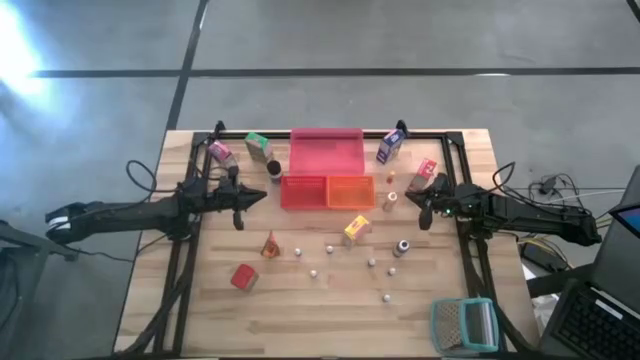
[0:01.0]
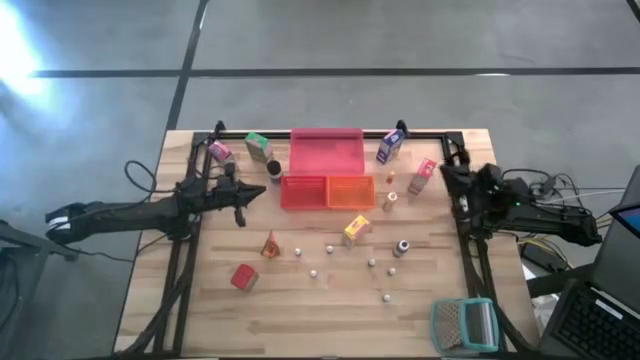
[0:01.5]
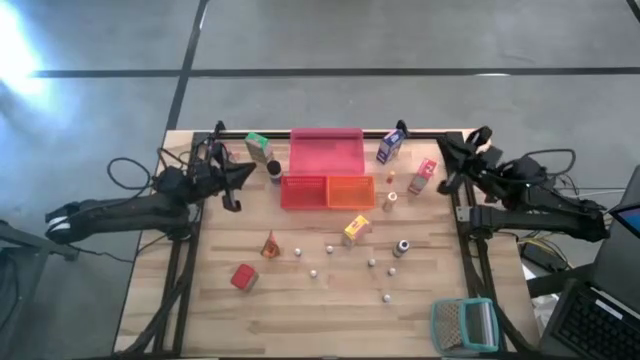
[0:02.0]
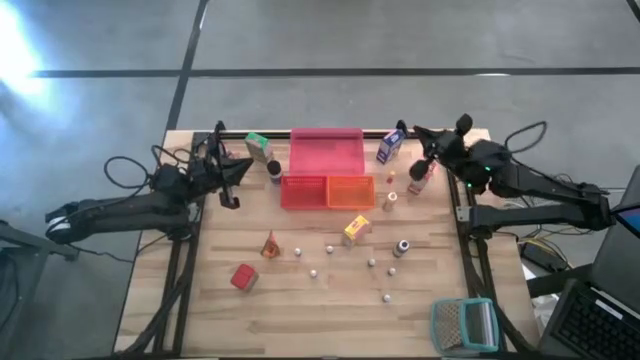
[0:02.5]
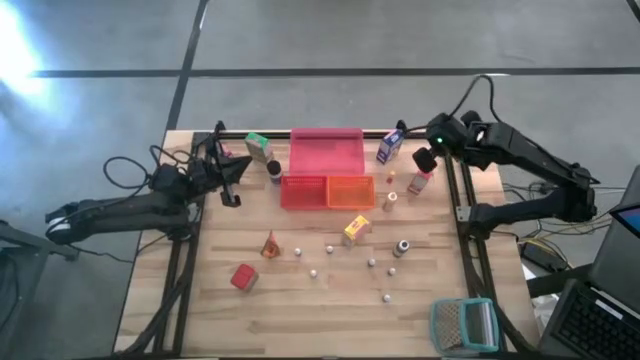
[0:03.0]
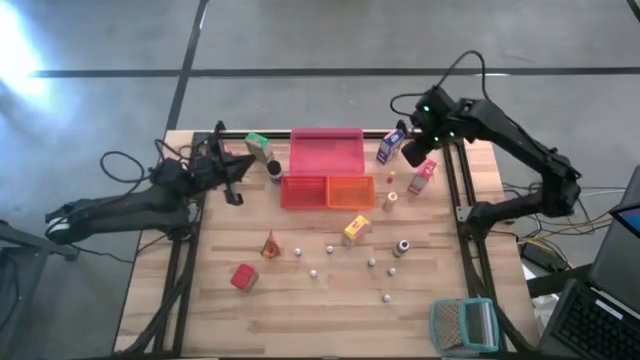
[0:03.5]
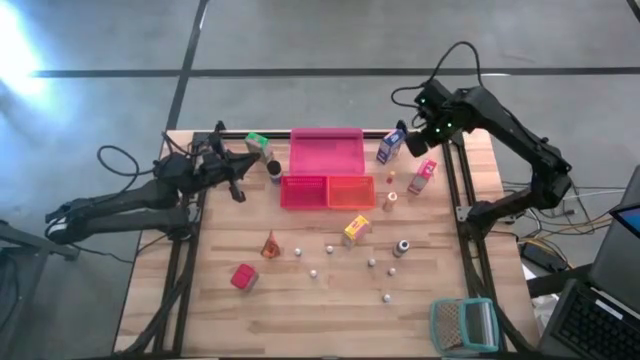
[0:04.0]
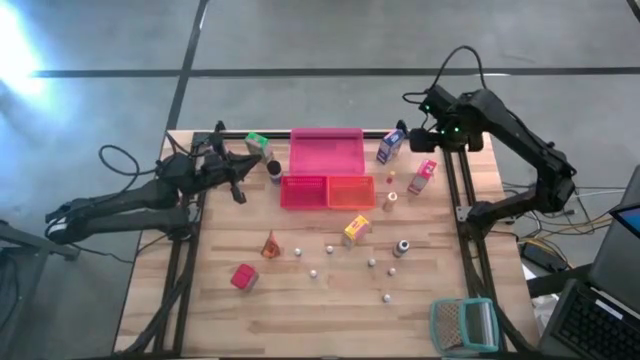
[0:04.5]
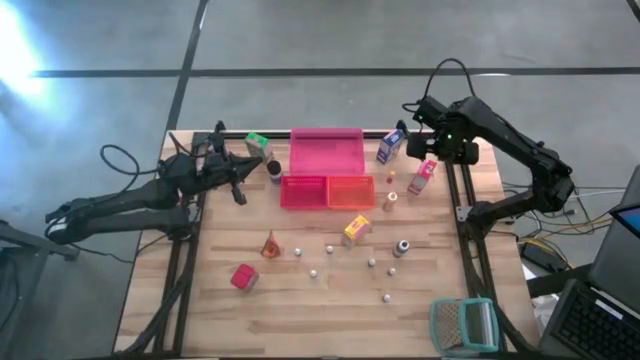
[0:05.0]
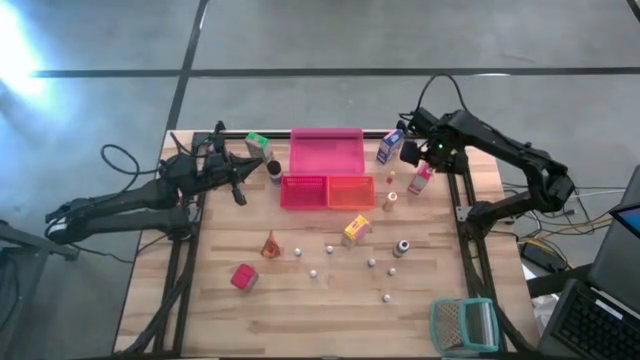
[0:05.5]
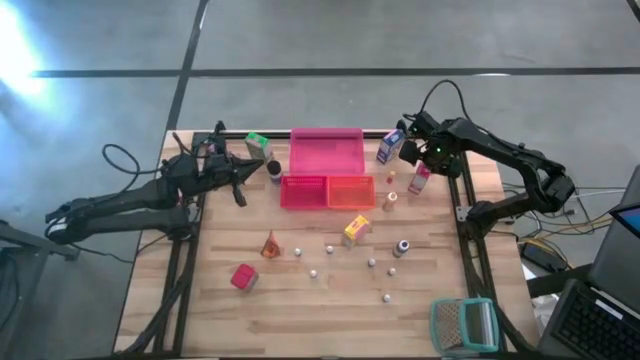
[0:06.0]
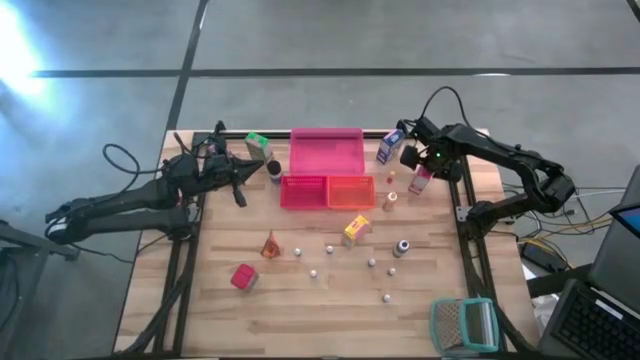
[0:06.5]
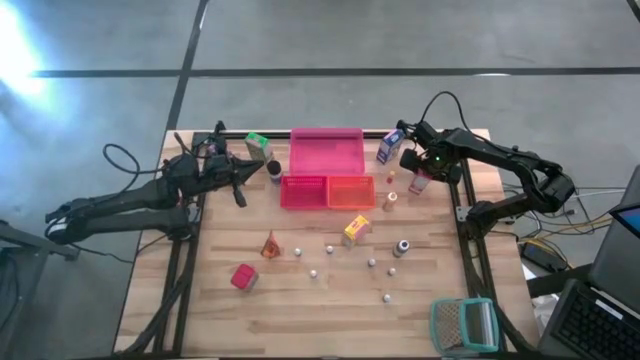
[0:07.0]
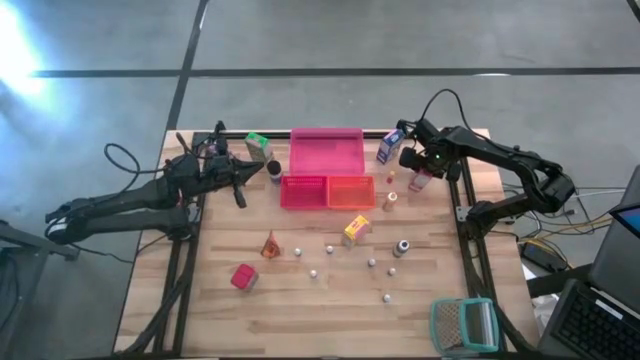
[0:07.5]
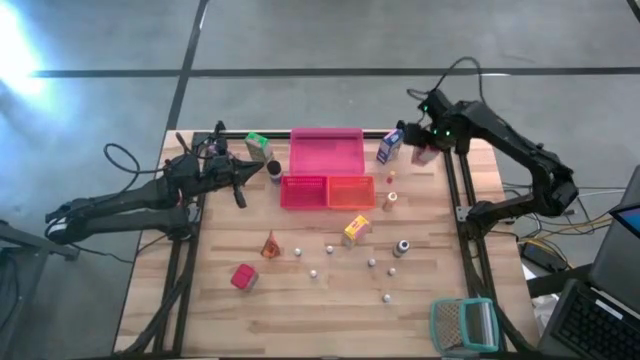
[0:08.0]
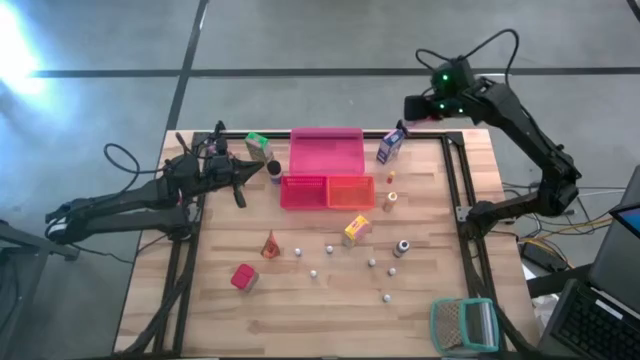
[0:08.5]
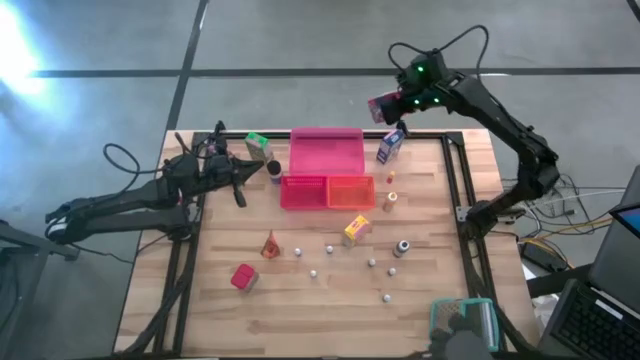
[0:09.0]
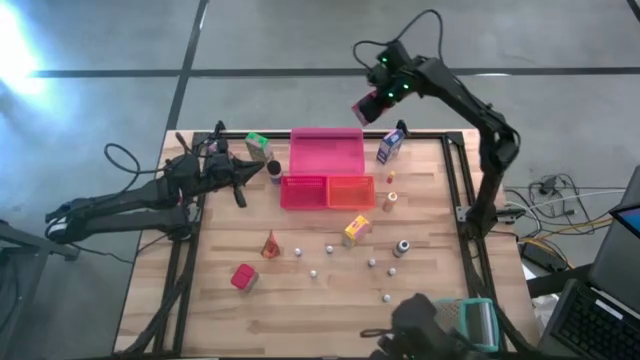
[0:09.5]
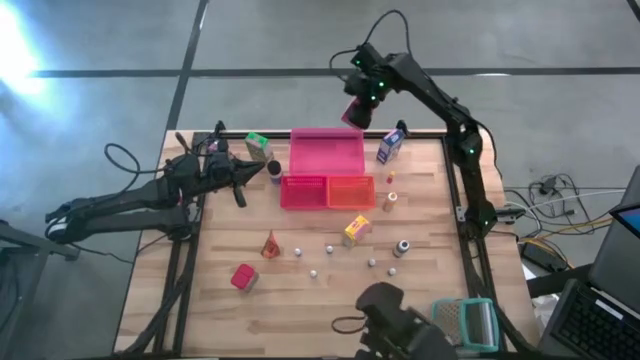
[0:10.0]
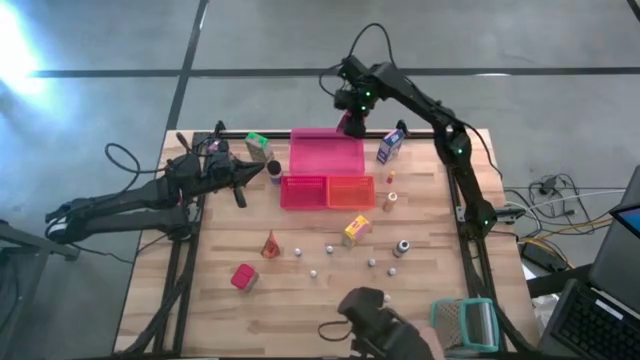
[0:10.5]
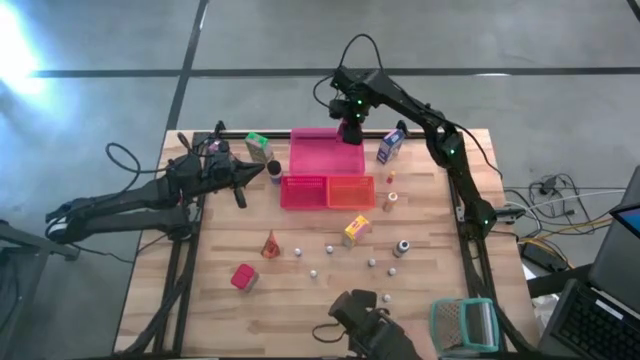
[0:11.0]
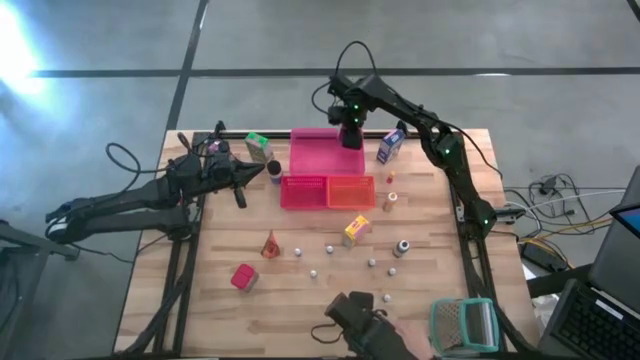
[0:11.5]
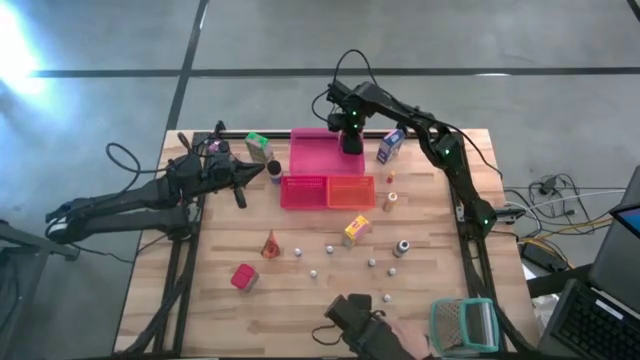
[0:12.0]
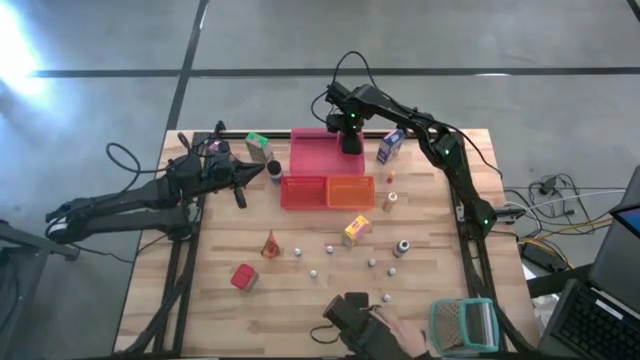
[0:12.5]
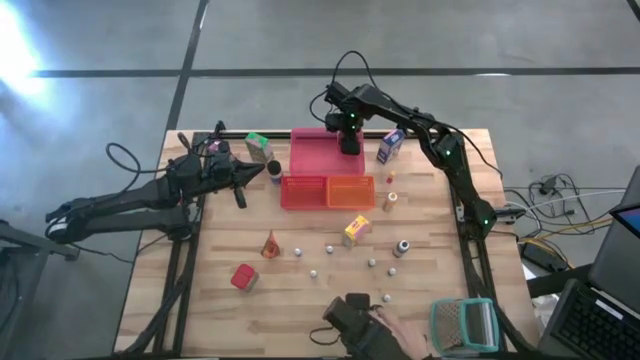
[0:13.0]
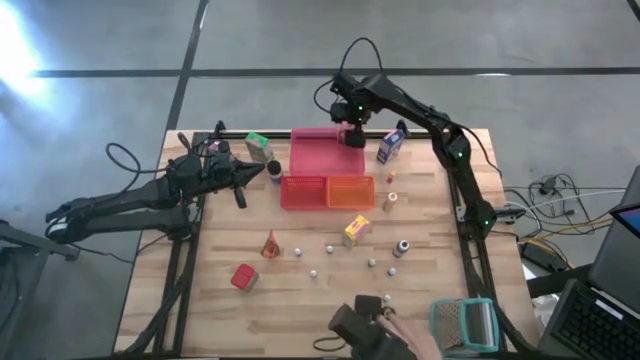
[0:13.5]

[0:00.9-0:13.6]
Task: Pick & Place Kitchen Items
Put the red cereal box into the pink bin

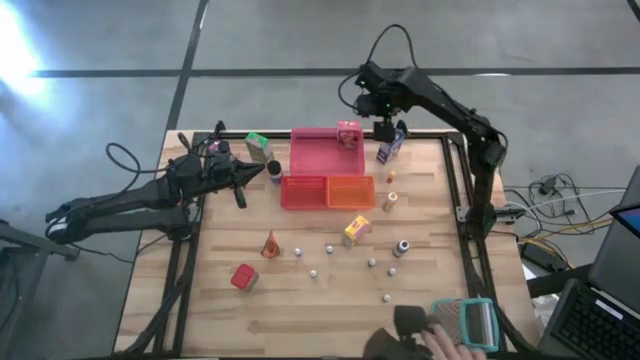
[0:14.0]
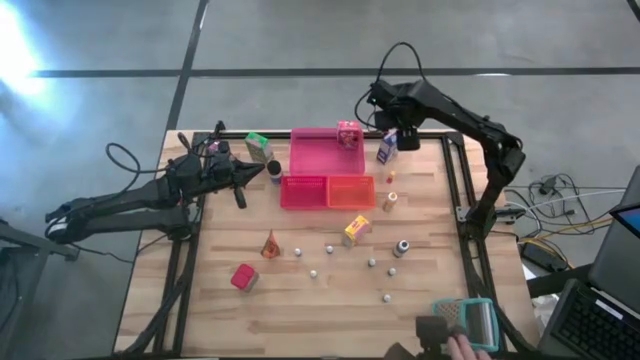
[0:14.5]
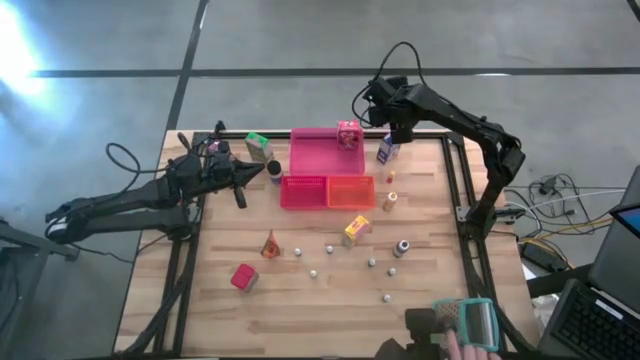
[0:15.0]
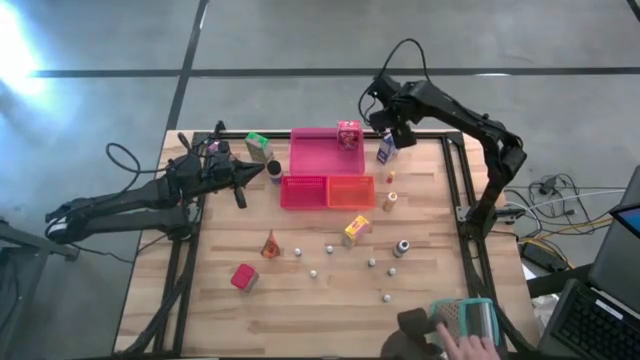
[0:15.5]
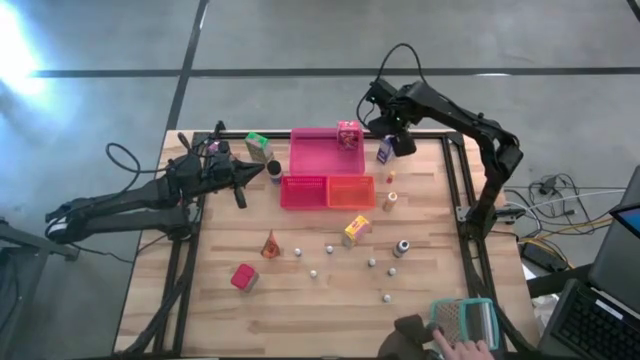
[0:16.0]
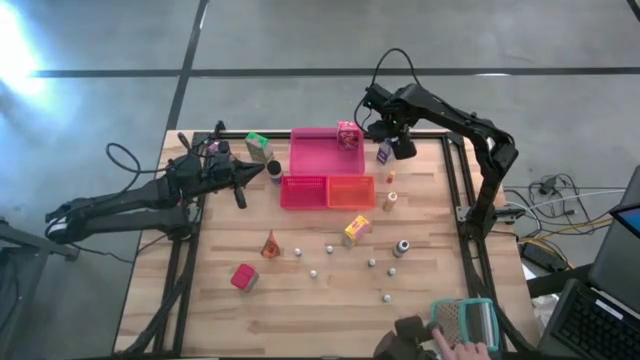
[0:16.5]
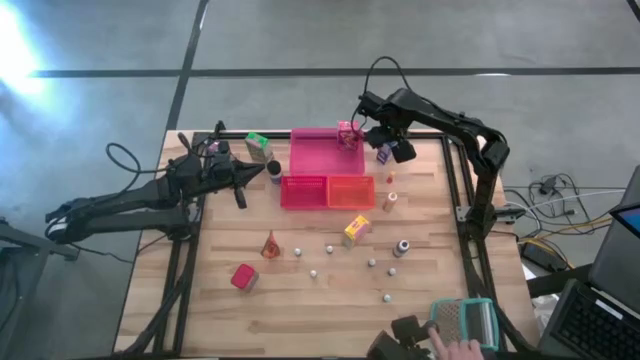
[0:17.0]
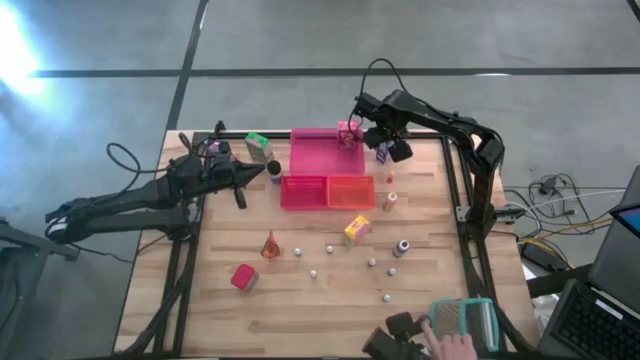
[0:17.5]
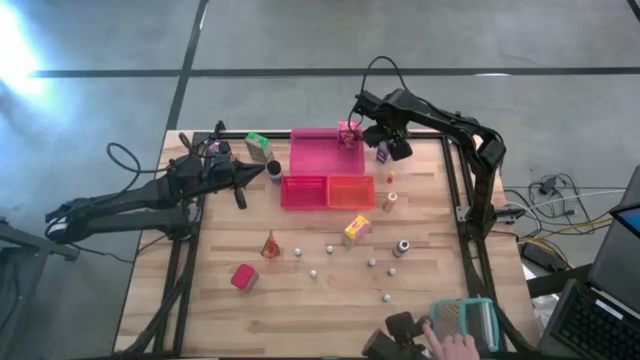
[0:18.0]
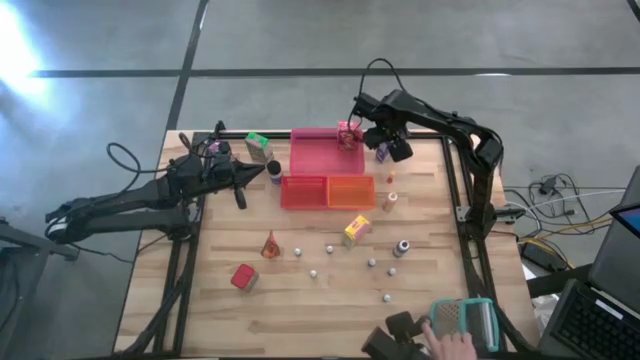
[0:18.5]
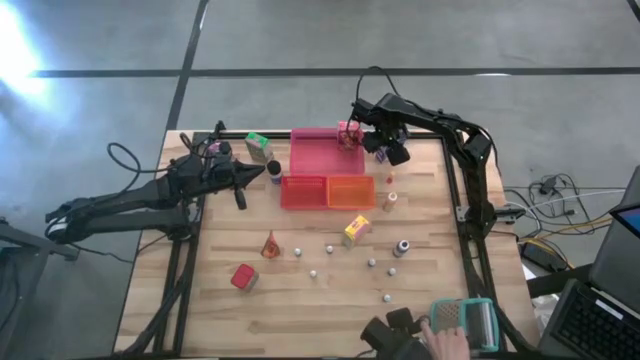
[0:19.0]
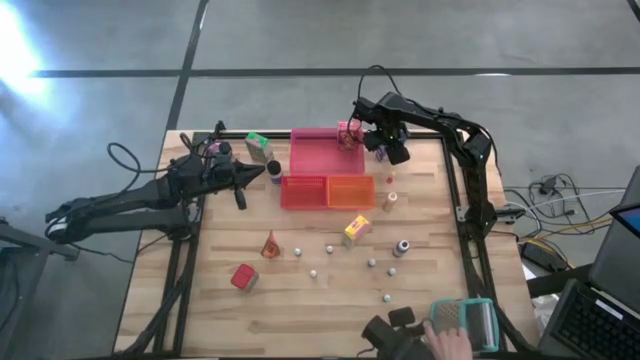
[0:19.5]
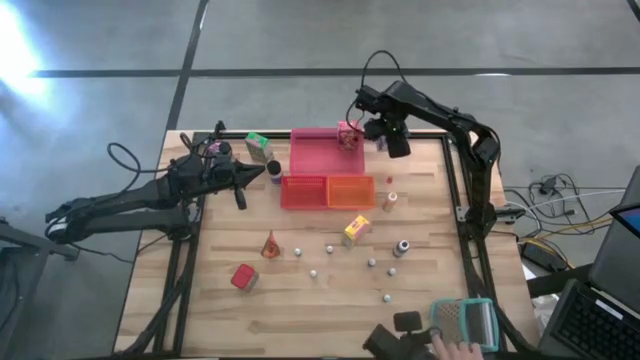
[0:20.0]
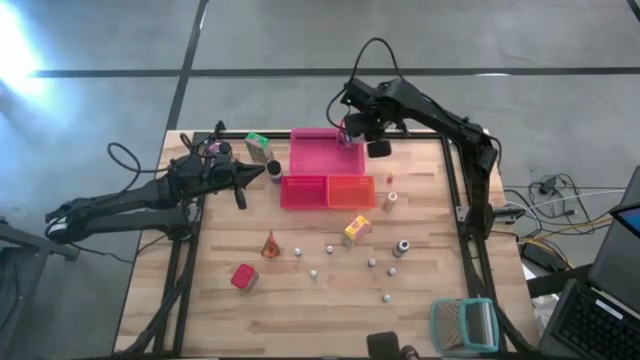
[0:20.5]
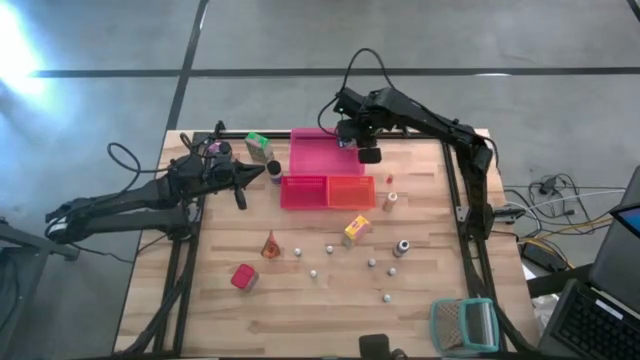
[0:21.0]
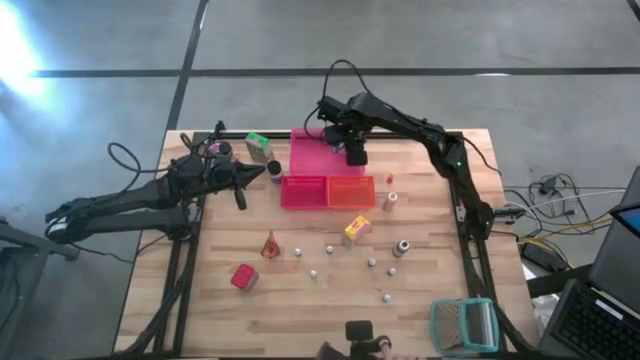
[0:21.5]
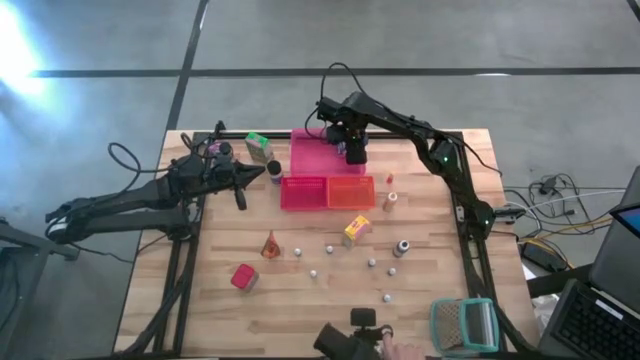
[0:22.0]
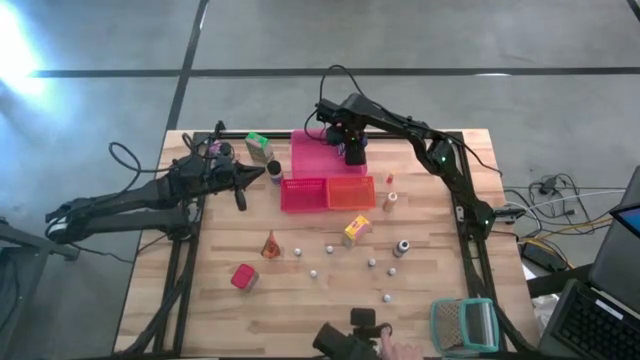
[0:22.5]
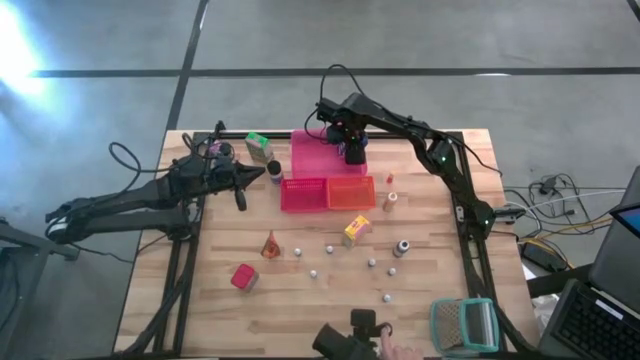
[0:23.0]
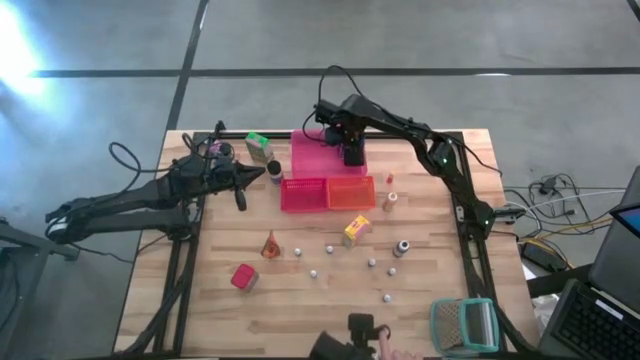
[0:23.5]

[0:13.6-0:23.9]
Put the blue cereal box into the pink bin
